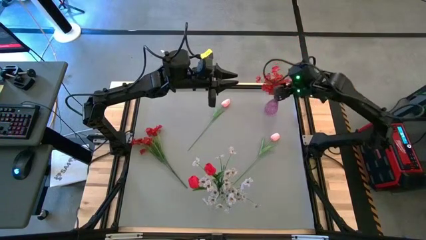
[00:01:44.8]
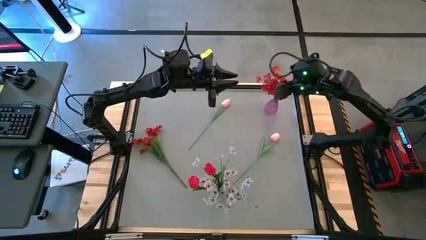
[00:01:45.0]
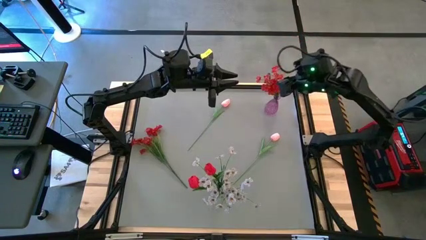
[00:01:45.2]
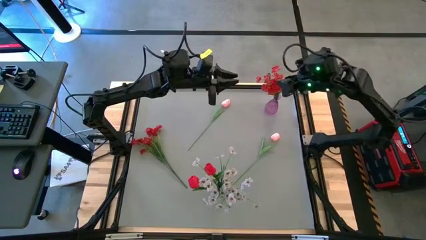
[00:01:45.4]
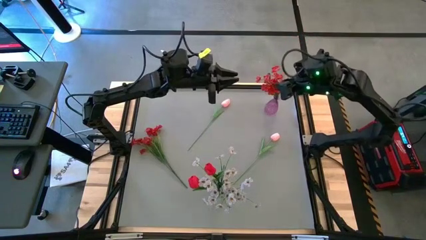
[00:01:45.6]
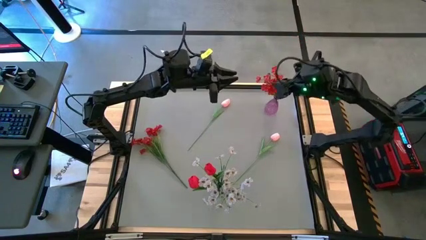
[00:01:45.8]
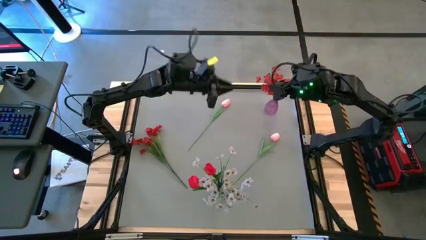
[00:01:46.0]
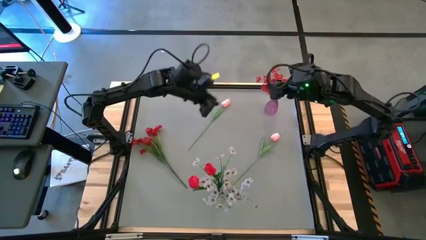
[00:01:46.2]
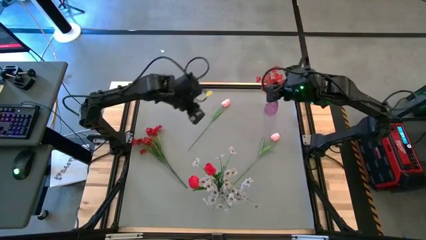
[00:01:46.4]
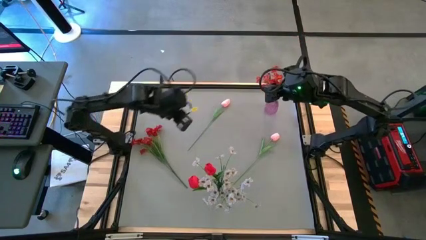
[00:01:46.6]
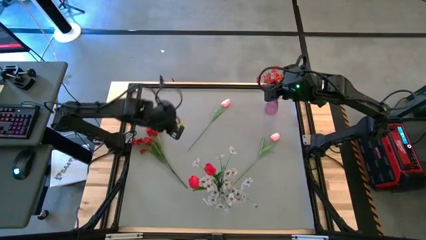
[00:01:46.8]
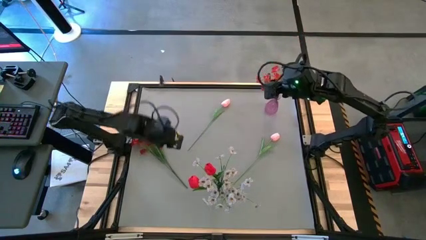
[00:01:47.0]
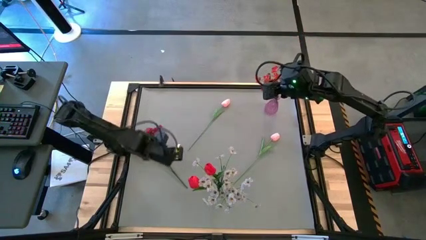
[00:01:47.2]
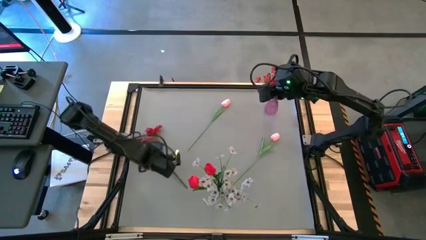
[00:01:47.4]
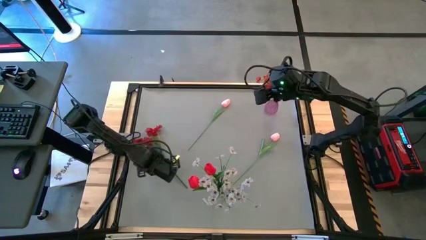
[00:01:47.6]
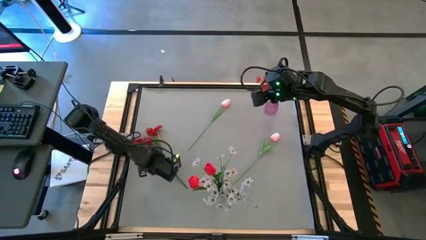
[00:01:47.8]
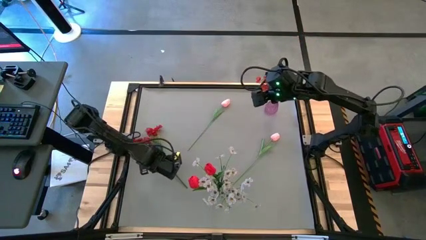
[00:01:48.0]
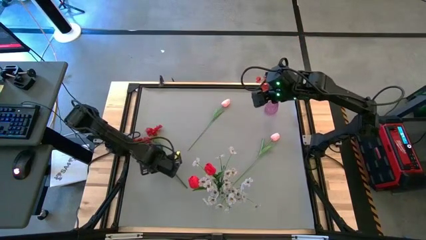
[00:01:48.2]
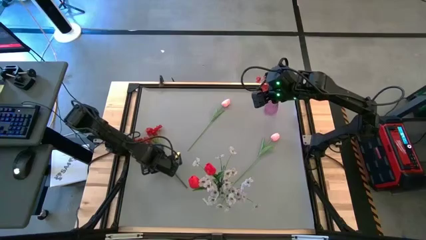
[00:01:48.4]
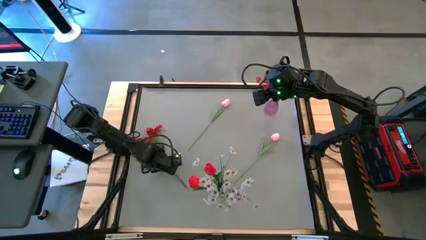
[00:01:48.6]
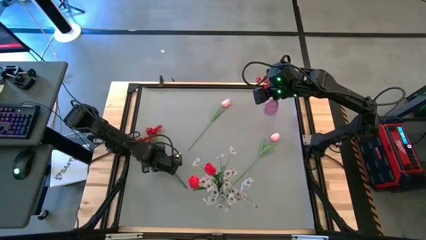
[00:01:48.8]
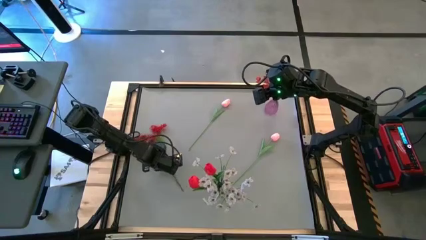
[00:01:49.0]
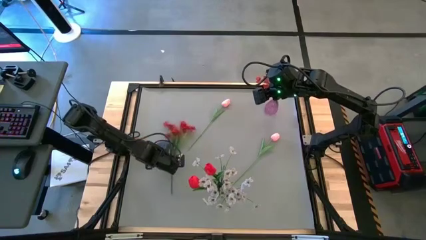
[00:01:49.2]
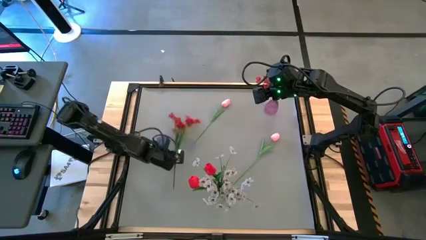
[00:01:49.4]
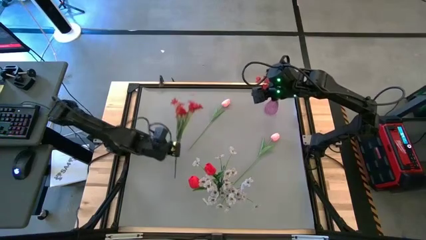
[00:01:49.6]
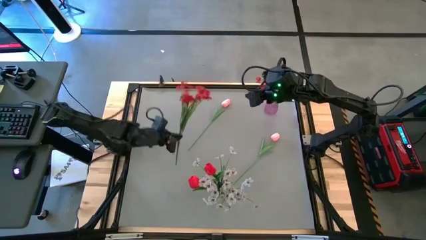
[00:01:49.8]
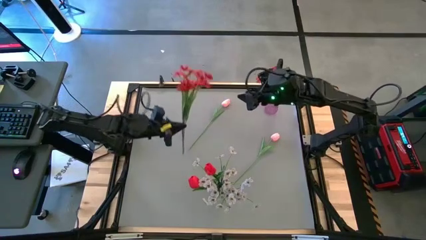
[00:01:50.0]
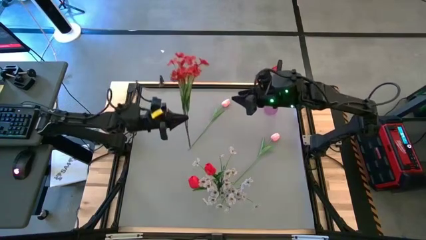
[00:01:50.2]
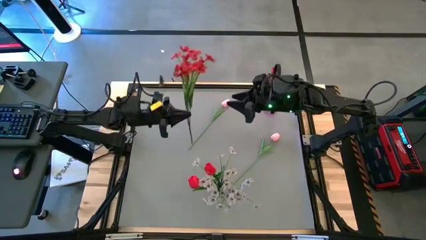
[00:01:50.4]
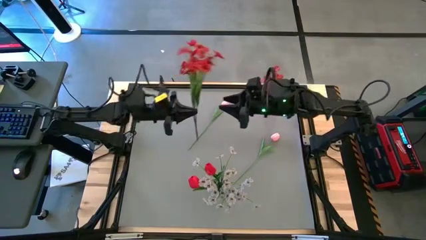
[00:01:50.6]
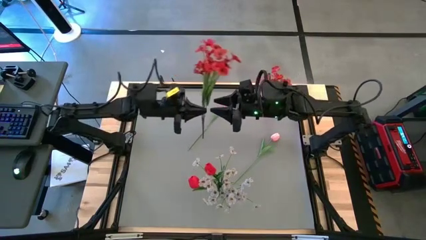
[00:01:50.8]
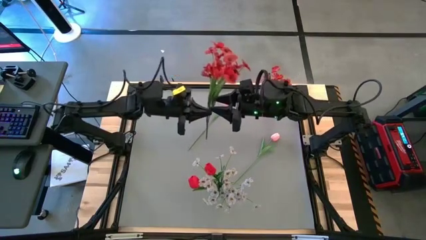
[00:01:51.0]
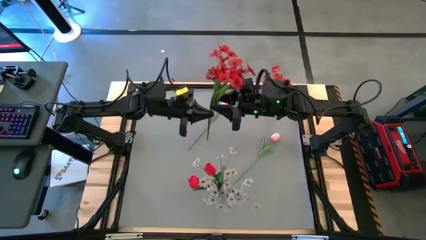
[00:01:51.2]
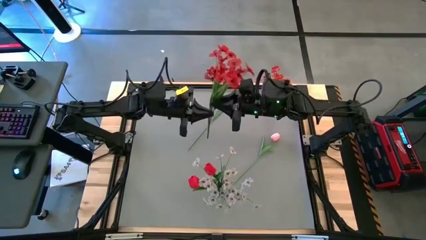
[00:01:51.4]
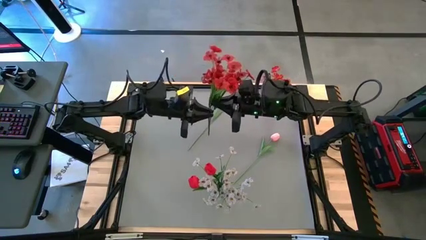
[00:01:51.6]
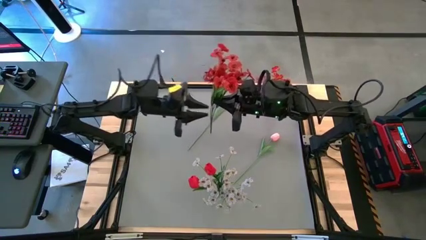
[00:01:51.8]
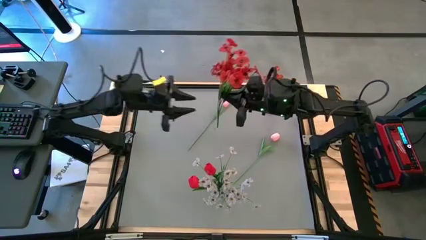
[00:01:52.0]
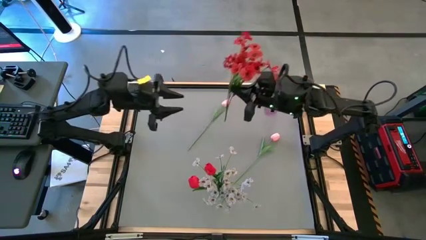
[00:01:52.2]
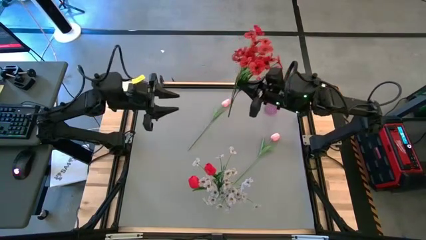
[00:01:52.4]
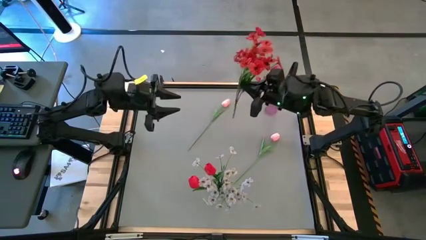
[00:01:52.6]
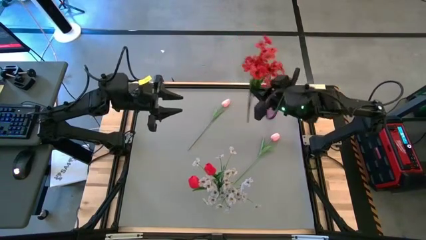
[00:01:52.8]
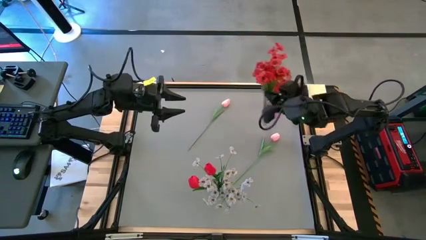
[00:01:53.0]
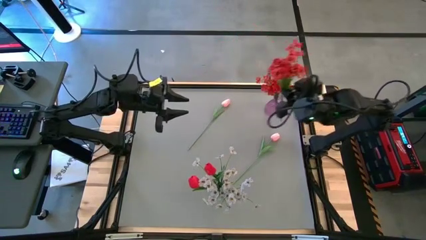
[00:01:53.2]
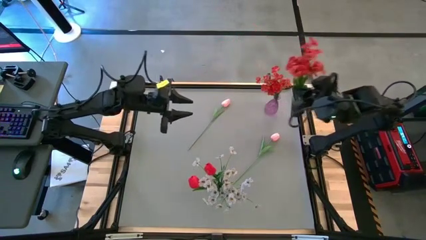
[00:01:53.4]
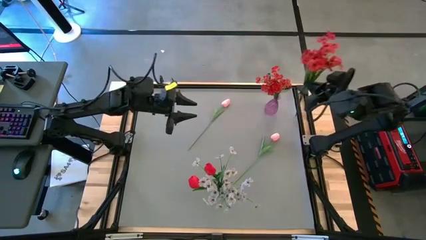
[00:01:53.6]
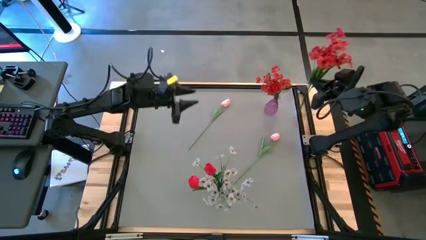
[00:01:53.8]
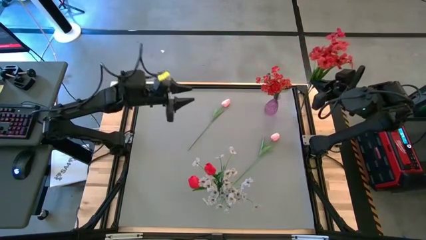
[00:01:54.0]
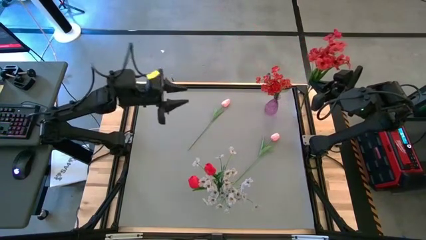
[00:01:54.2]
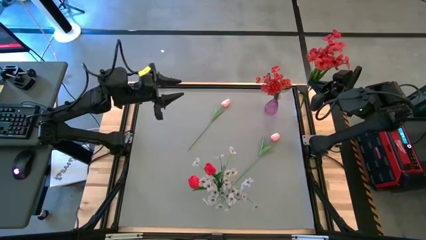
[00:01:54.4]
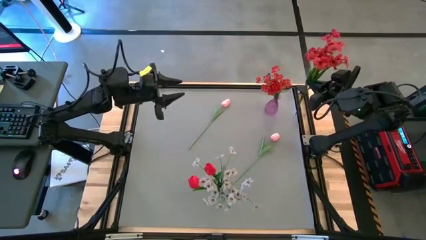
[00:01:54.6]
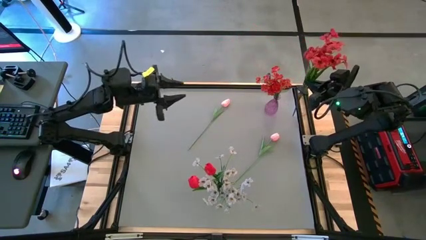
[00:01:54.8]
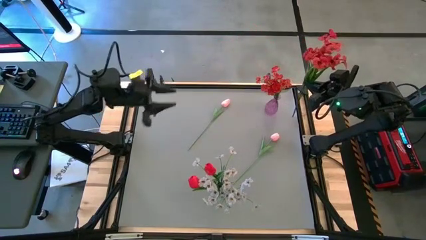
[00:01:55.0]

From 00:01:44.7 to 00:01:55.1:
Task: Sort flowers into vase by color
Put the red flowers into the violet vase

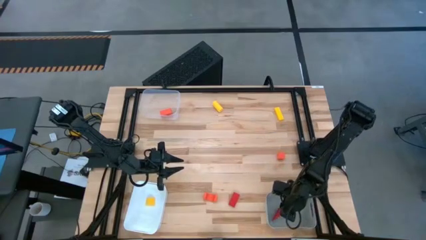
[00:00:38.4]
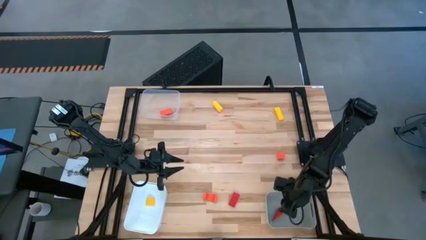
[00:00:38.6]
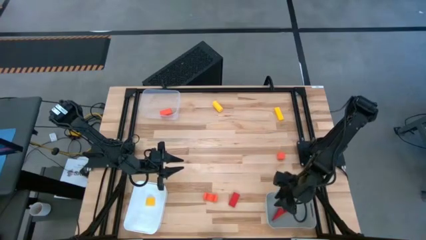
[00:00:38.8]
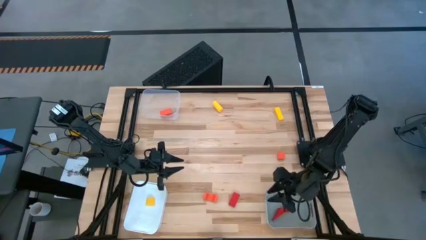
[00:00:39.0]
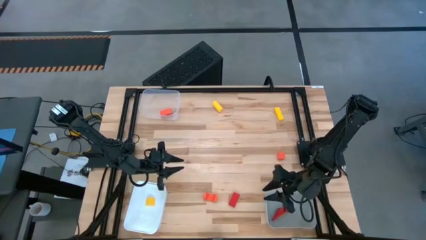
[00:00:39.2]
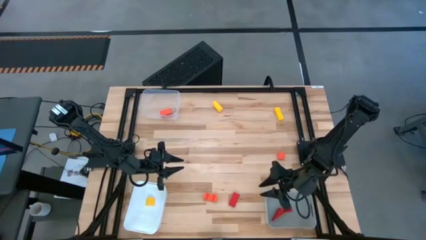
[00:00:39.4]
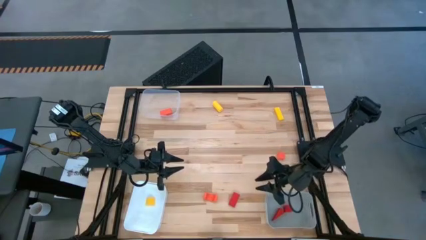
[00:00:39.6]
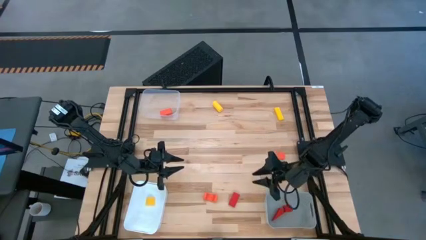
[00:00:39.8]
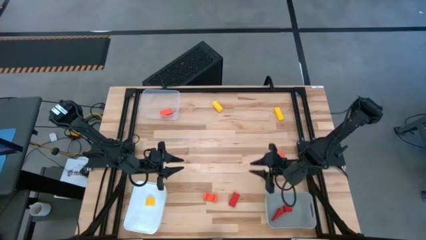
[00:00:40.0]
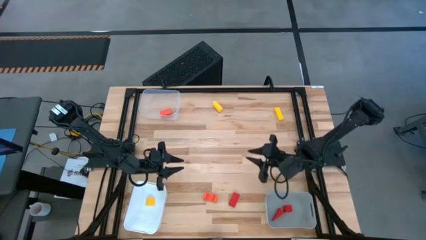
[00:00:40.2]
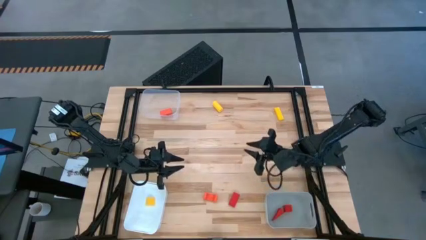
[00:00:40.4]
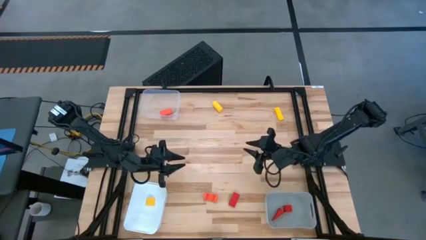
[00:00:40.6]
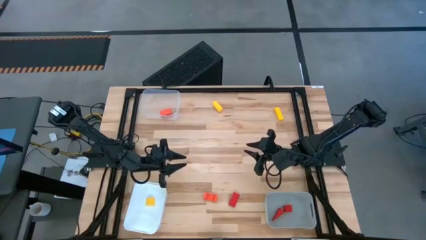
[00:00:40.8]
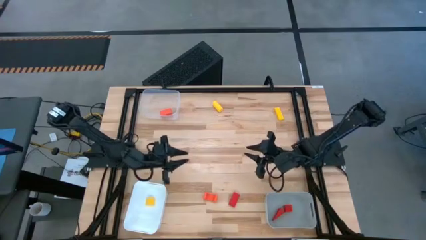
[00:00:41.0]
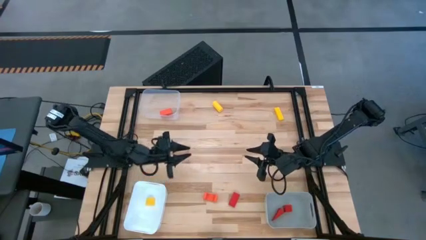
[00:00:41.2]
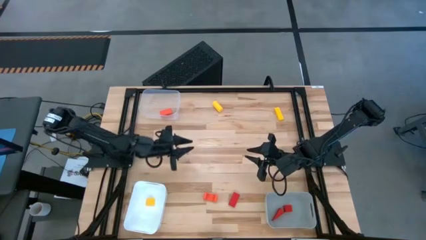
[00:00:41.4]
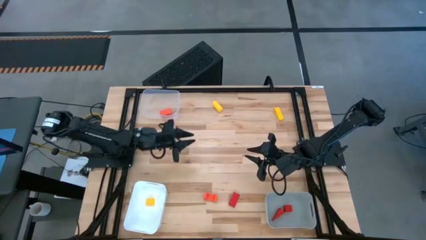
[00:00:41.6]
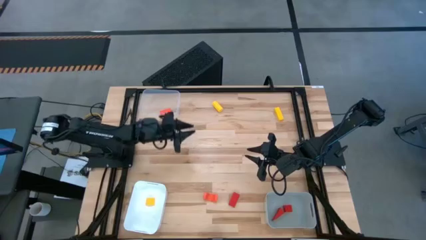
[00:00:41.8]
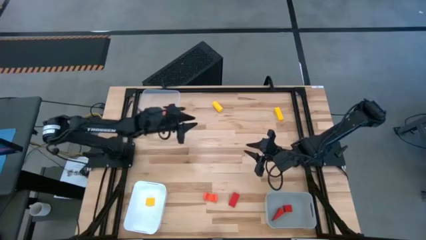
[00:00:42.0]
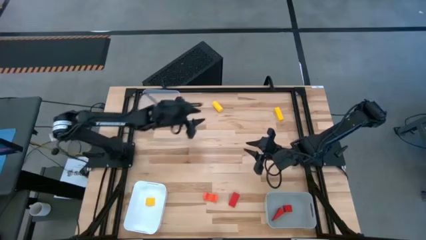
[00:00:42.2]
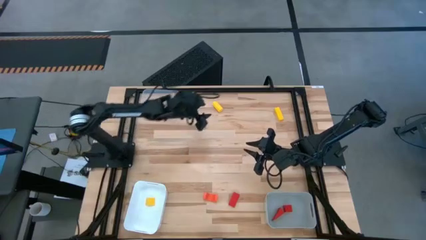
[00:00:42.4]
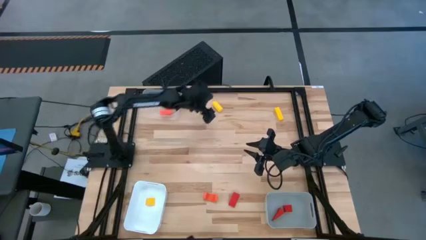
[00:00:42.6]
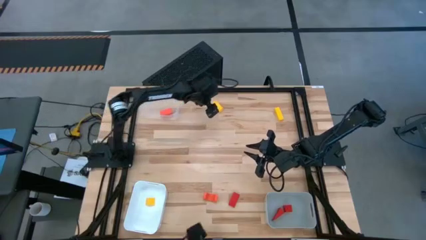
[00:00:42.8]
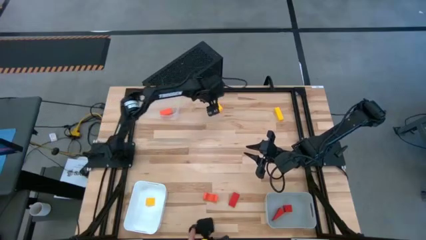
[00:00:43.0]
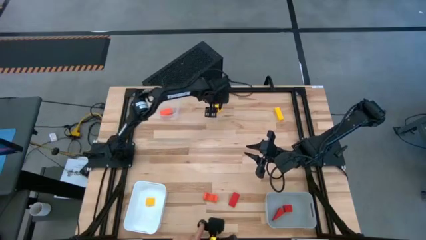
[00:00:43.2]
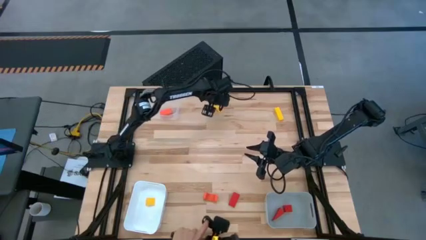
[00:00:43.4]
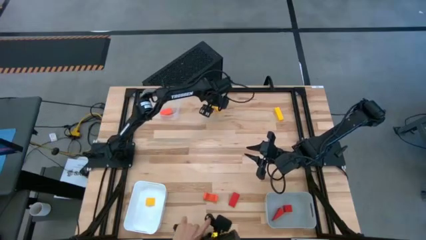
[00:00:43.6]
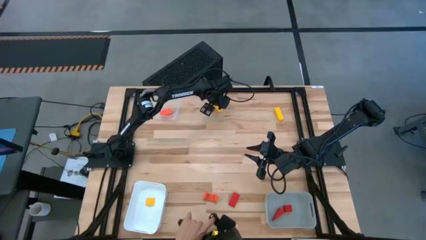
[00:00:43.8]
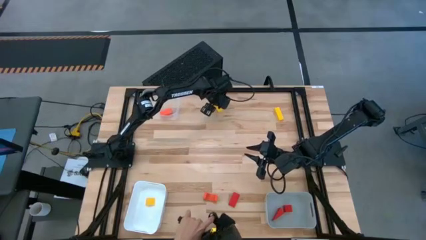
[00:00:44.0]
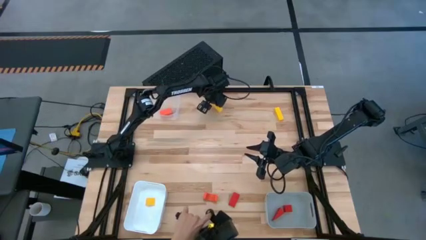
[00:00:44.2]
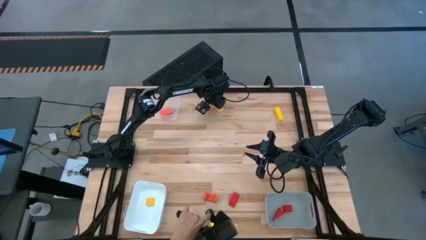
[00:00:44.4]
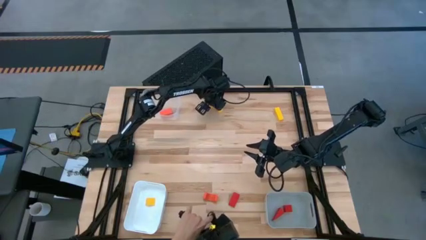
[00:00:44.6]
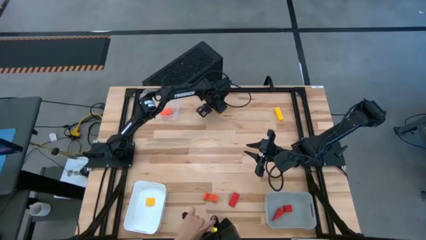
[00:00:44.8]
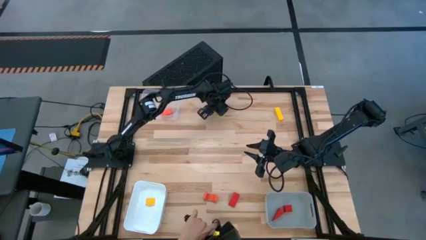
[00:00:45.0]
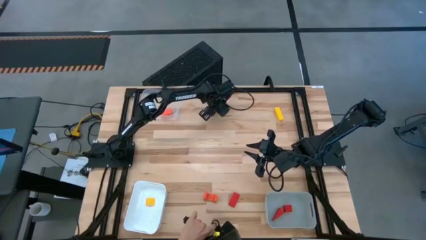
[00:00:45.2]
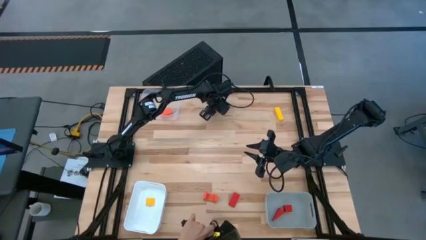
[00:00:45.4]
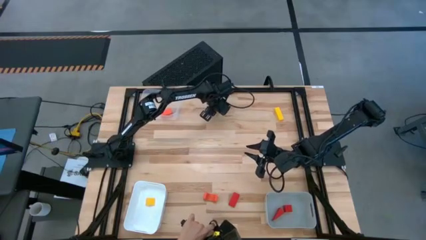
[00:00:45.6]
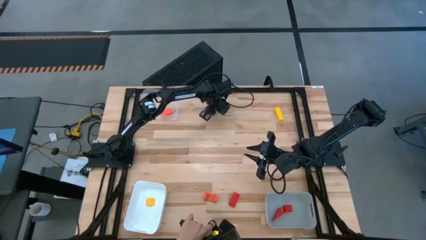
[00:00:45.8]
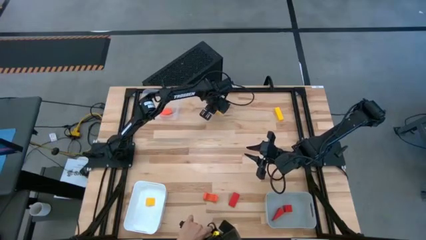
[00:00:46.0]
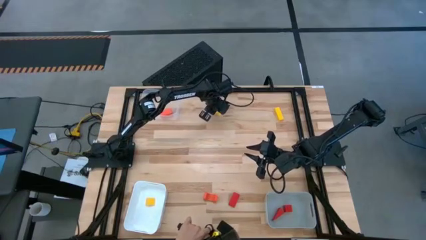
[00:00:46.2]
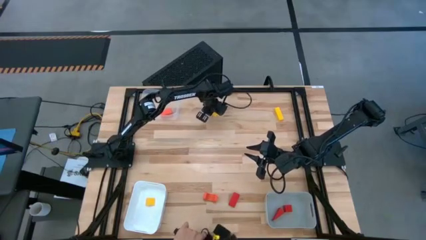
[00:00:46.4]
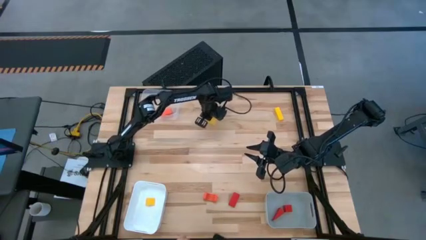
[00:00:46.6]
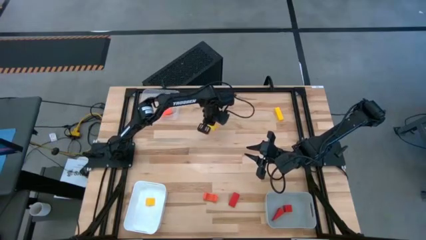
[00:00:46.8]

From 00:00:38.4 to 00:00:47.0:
Task: Sort & place blocks by color
Put the left yellow block into the white bin
